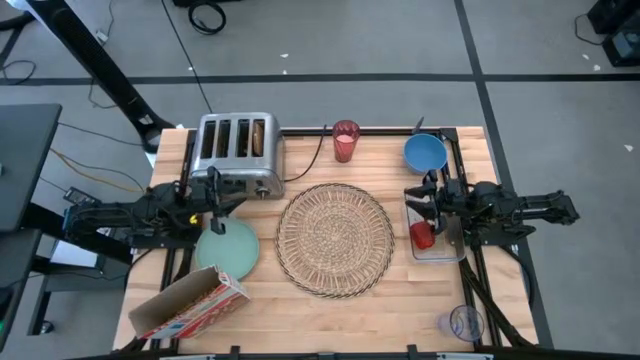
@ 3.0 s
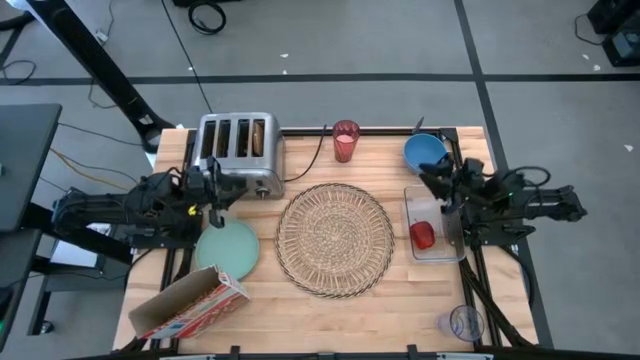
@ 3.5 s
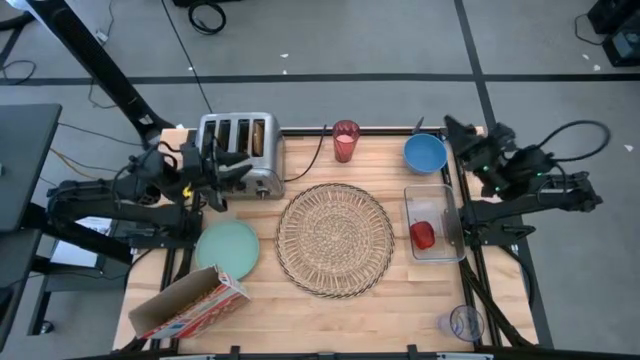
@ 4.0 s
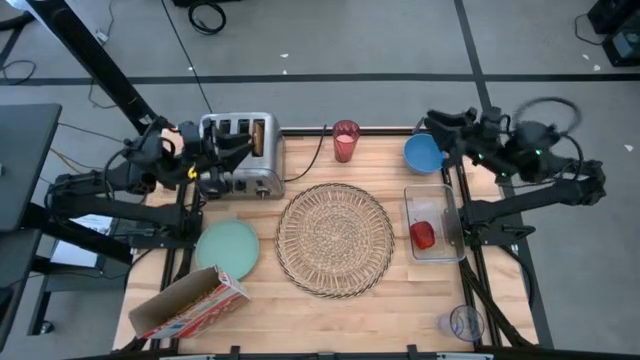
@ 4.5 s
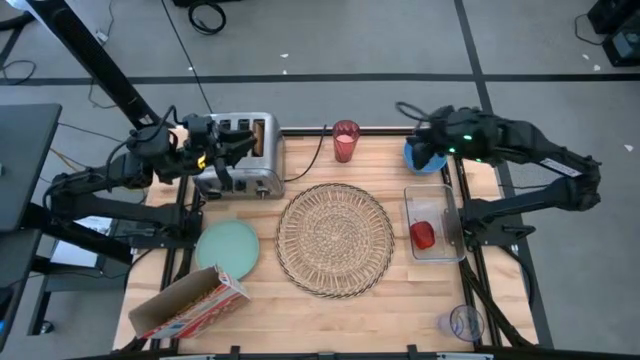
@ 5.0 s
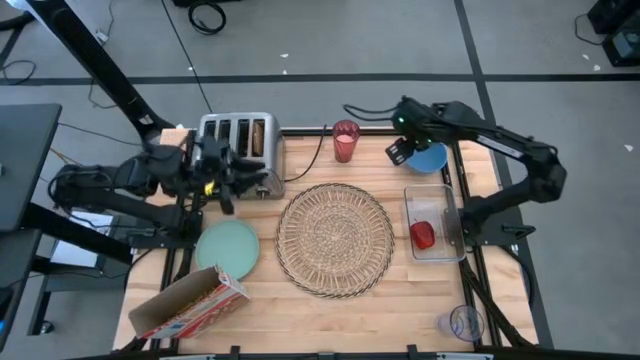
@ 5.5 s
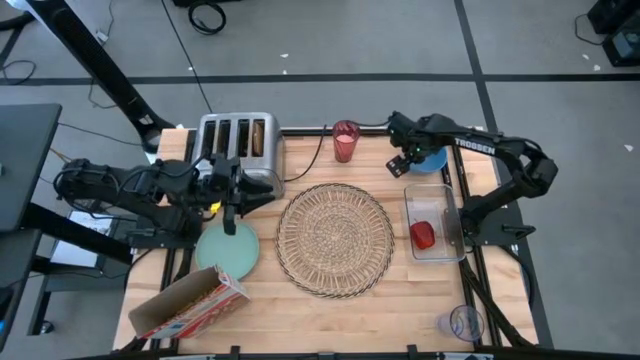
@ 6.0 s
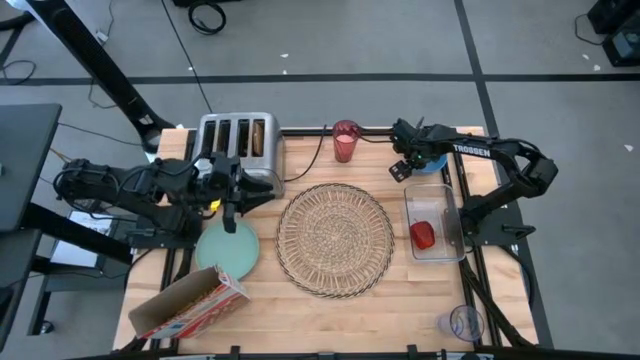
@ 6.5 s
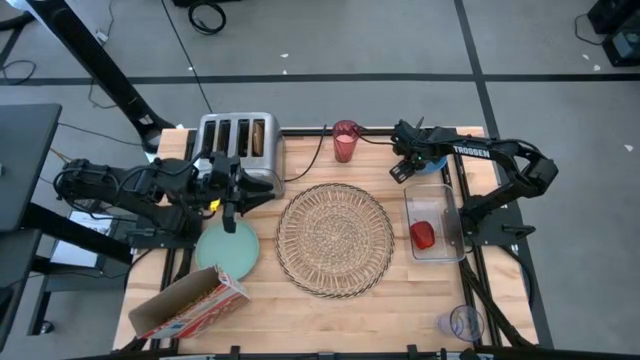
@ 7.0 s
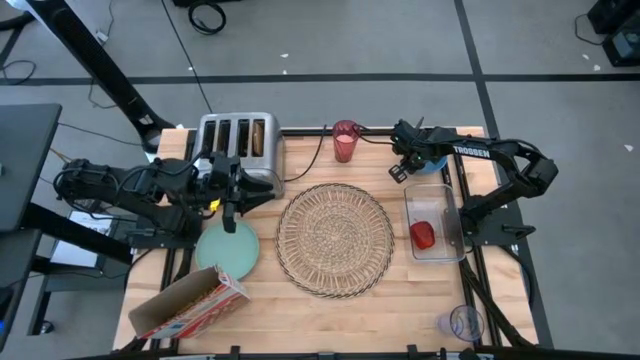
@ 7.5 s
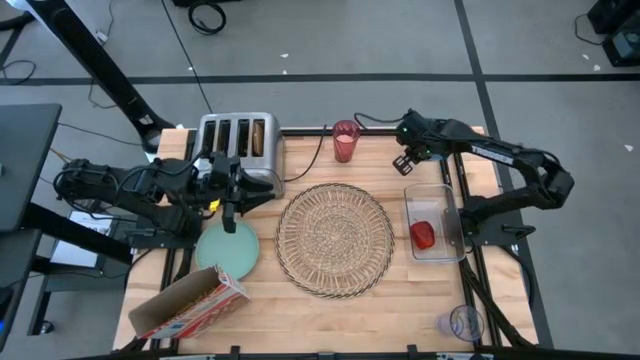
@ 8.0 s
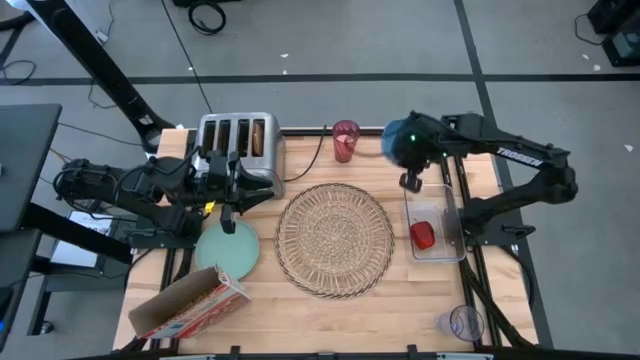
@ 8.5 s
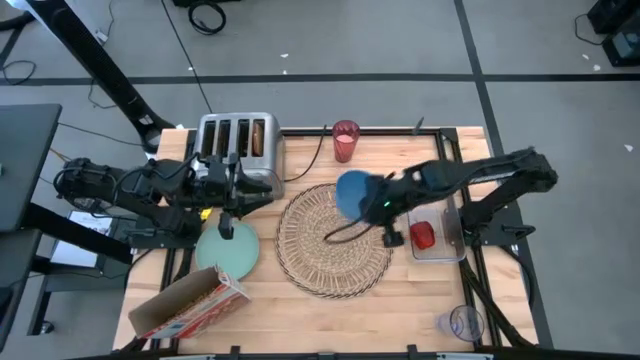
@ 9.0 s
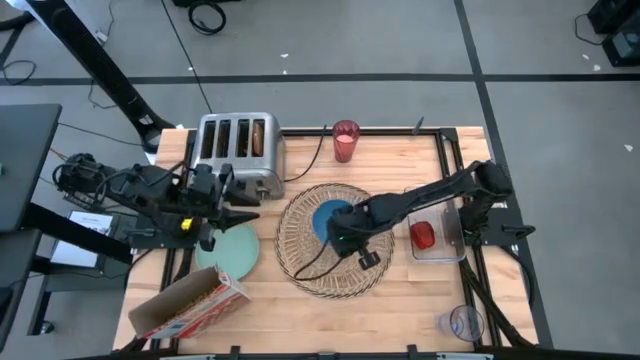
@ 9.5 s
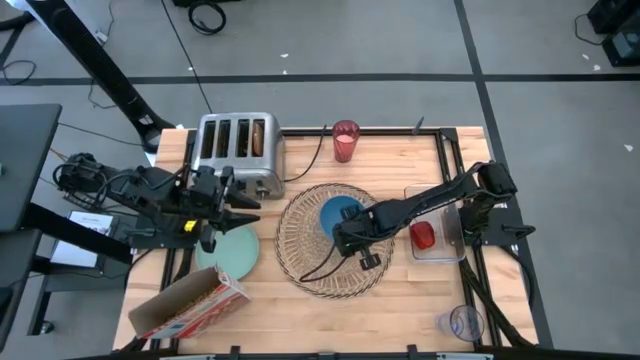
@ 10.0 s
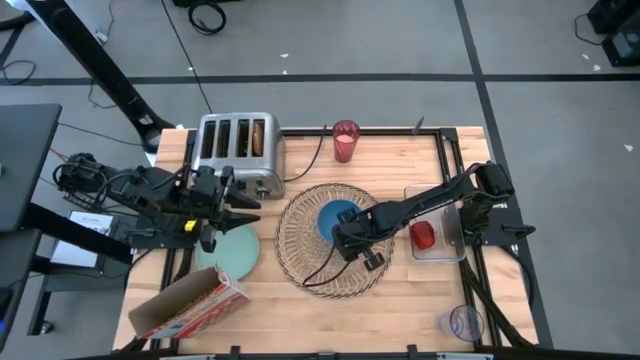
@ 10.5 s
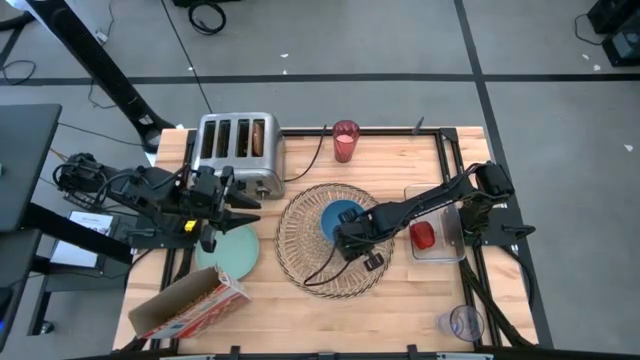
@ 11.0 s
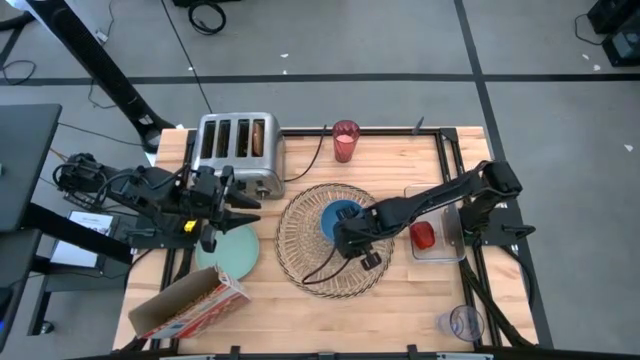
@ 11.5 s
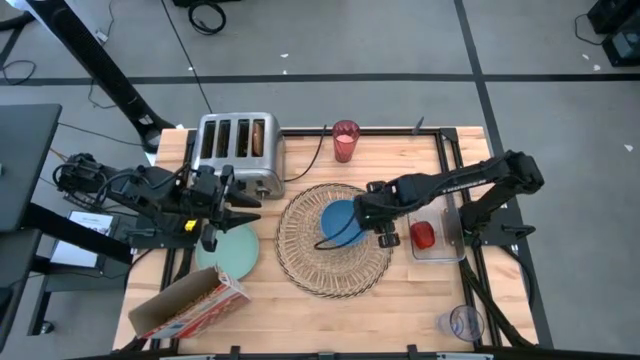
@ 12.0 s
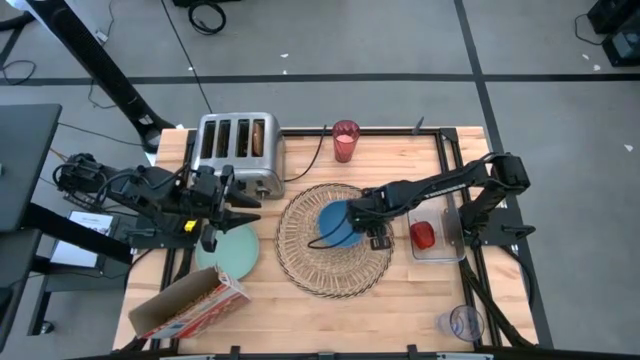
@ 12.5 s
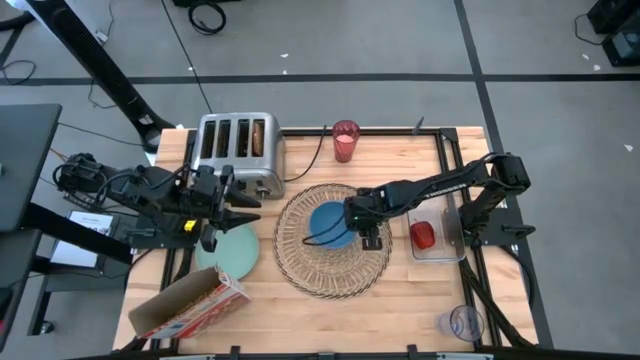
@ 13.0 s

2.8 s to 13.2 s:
Task: Arrange a breakfast setting
Put the blue bowl on the brown mat

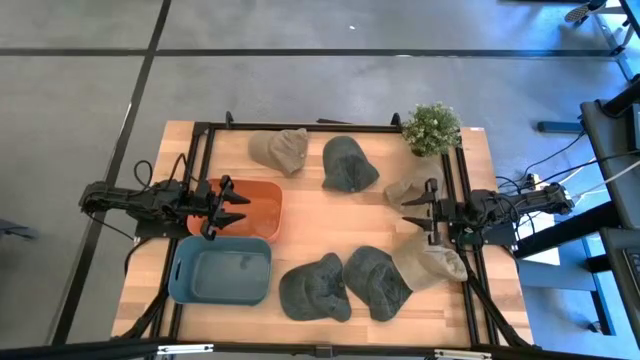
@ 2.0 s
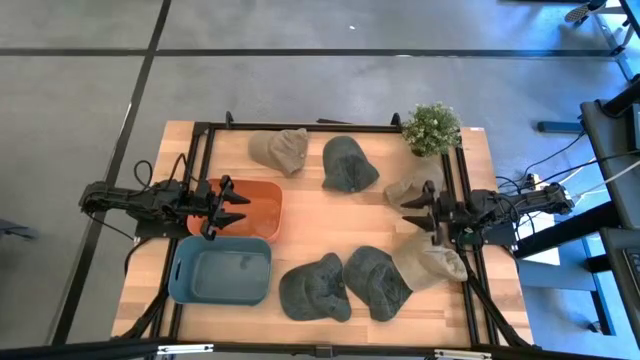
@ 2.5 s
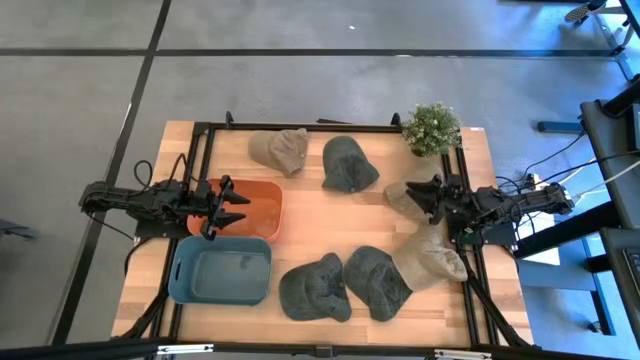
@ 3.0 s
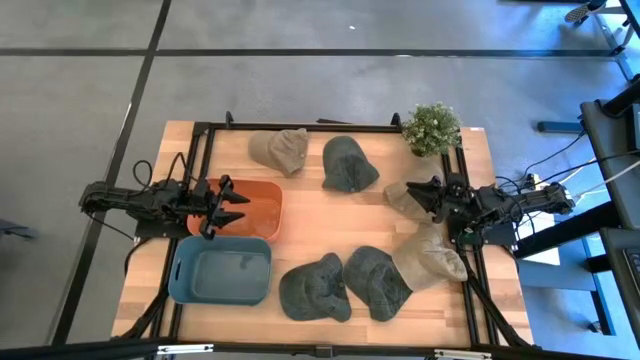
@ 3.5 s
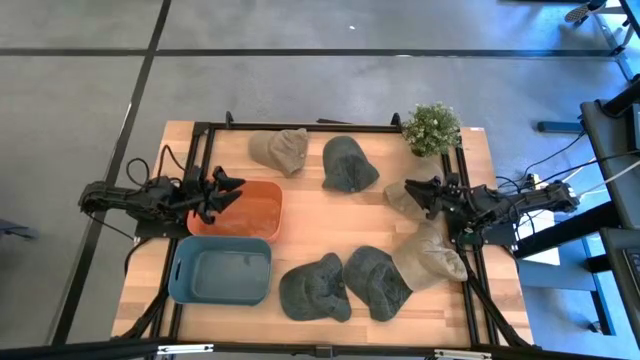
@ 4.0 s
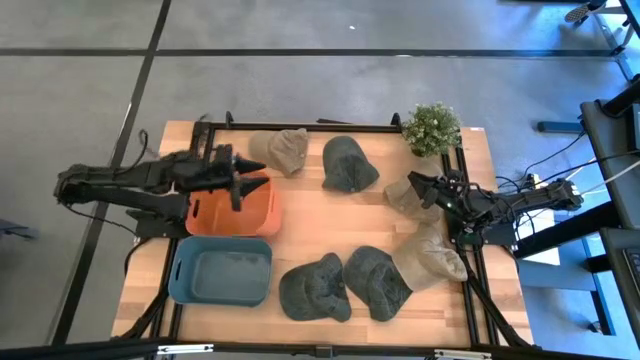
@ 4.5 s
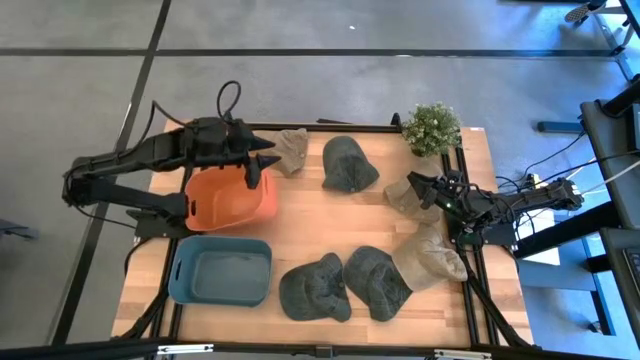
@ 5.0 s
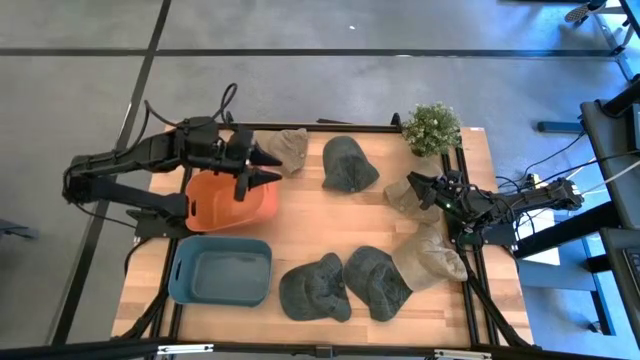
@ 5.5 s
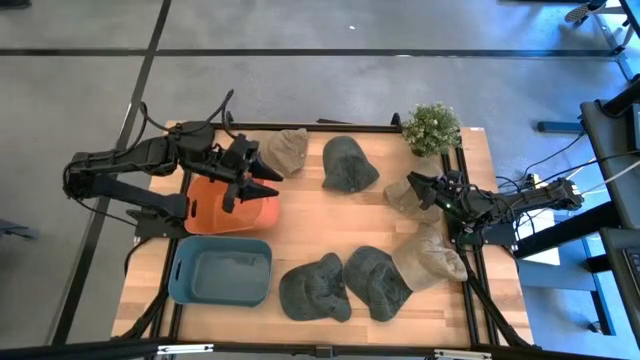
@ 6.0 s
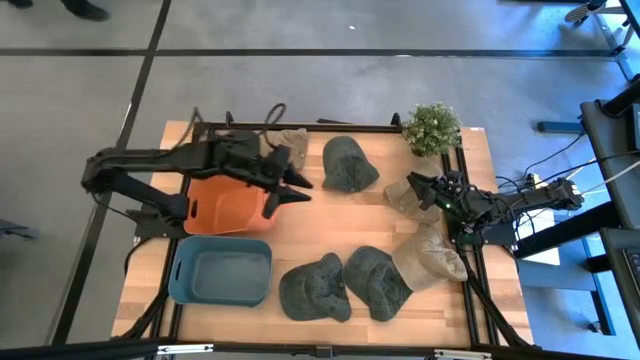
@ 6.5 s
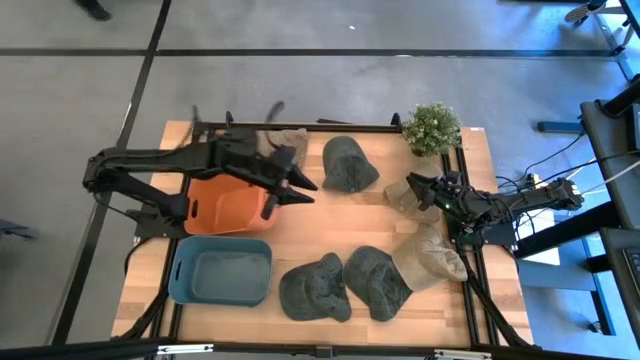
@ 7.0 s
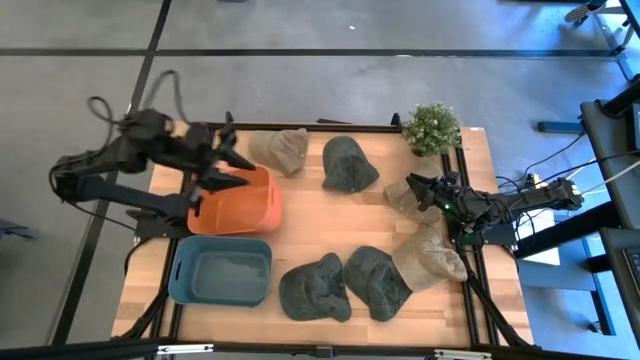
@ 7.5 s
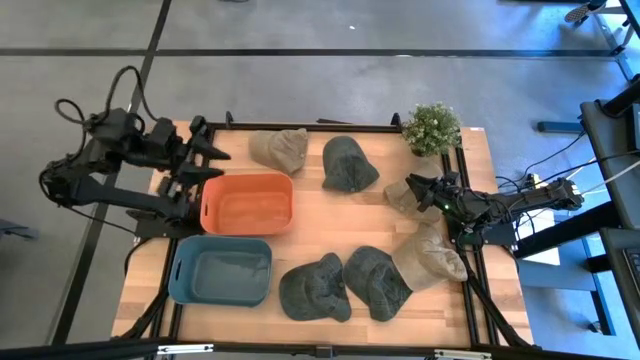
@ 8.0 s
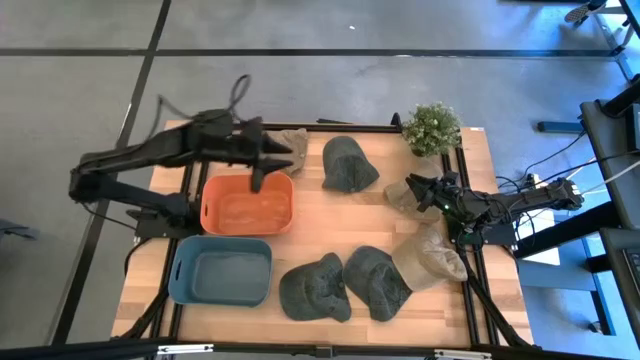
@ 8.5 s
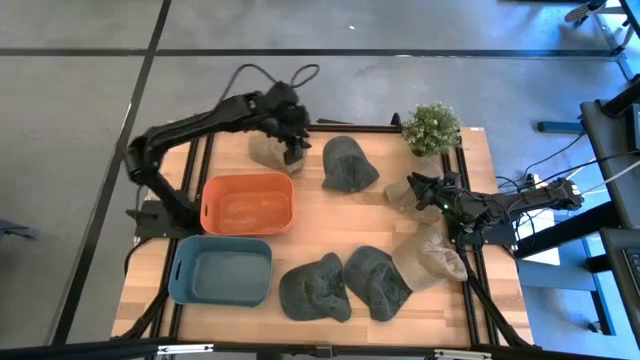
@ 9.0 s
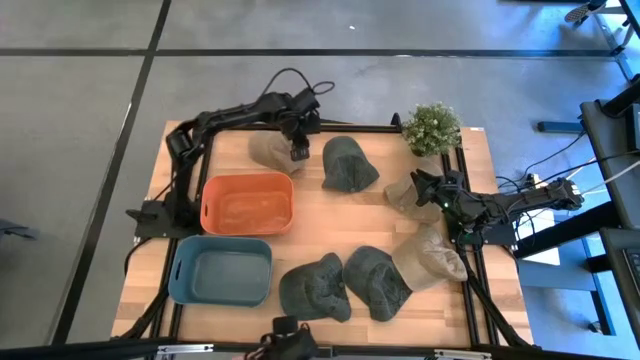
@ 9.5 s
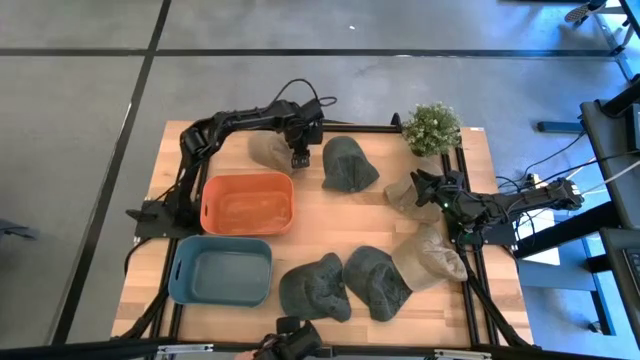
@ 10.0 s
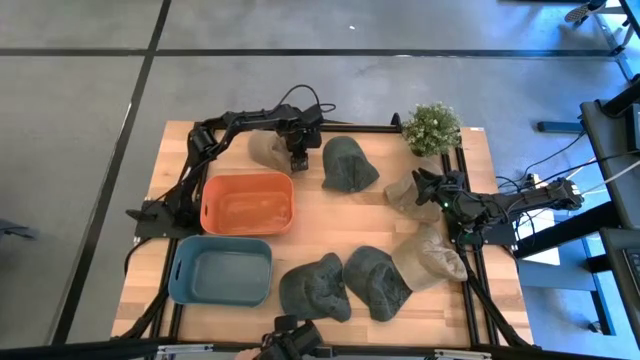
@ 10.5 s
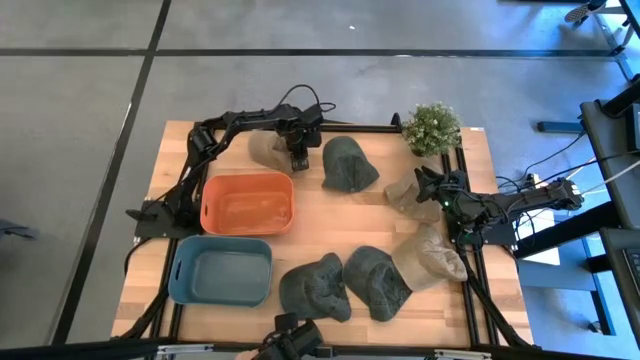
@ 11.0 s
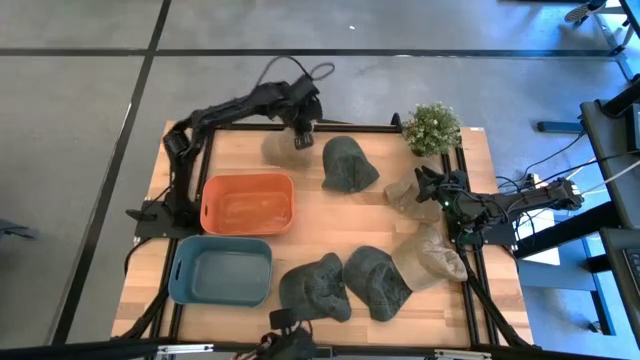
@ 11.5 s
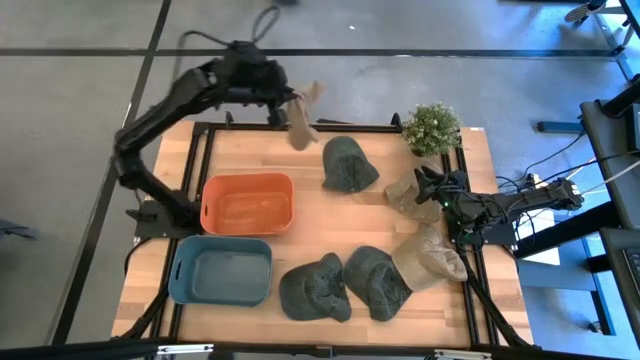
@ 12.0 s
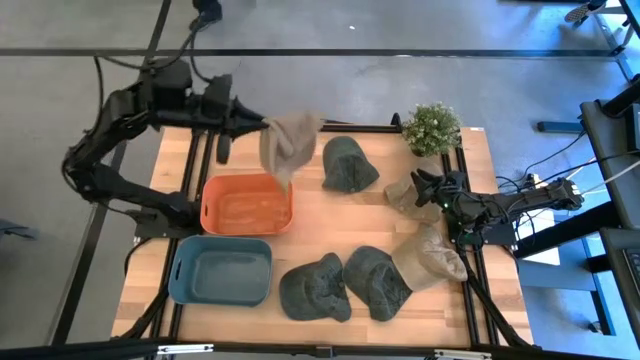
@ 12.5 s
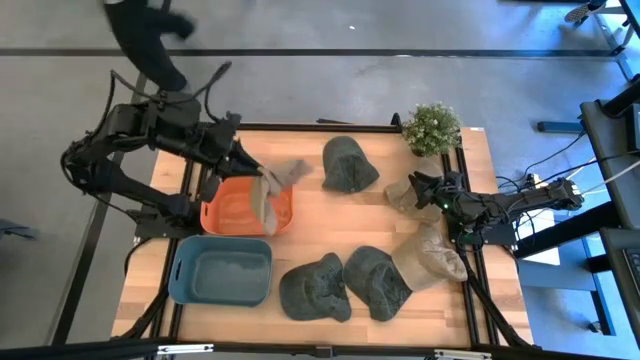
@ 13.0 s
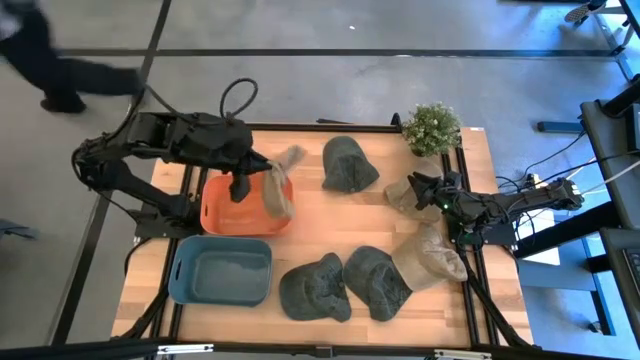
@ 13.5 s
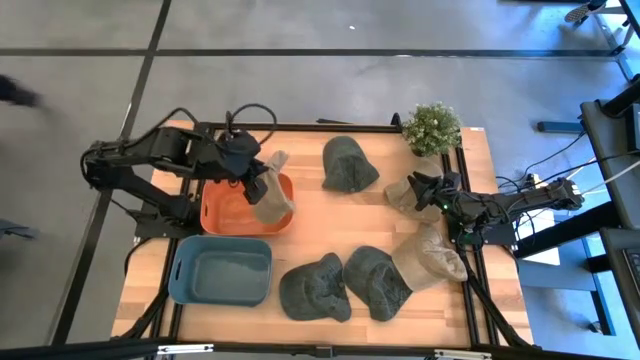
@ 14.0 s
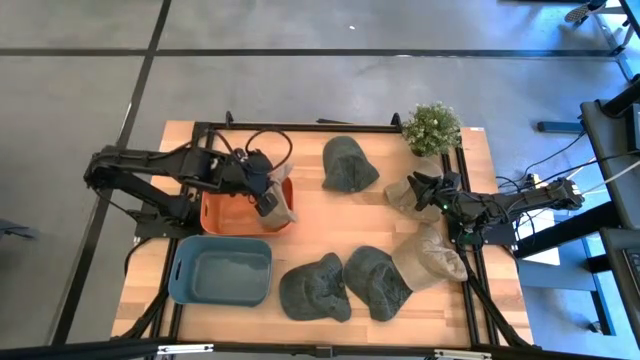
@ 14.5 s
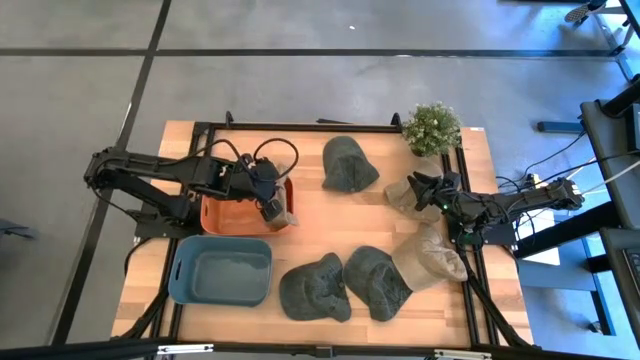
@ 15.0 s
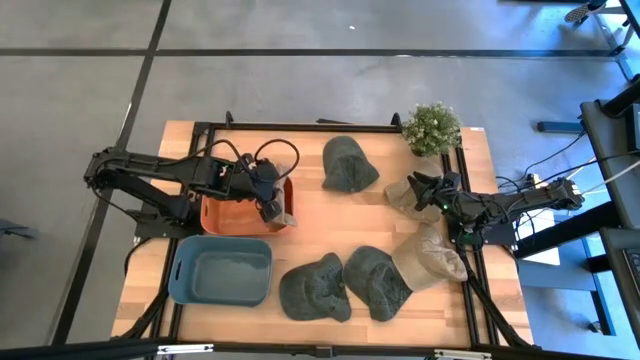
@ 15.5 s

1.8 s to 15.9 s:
Task: Pick & Place hat
Put the top left brown cap into the orange bin
